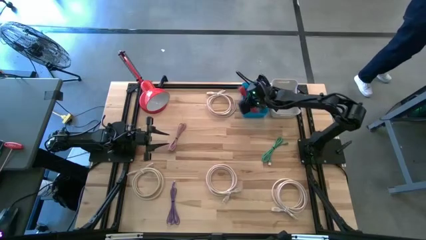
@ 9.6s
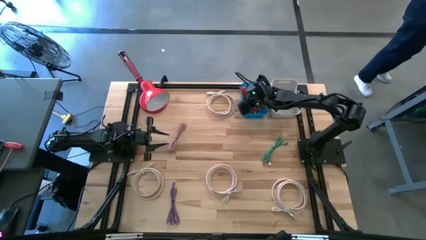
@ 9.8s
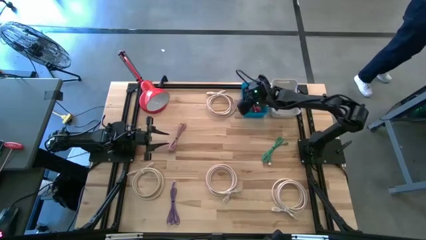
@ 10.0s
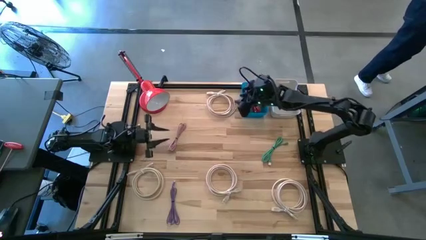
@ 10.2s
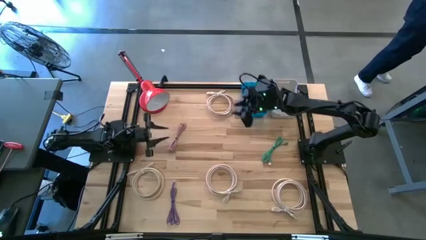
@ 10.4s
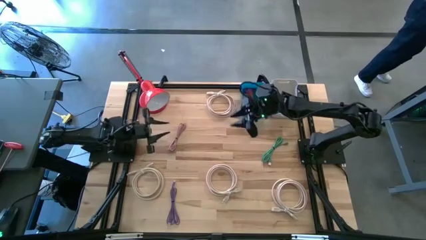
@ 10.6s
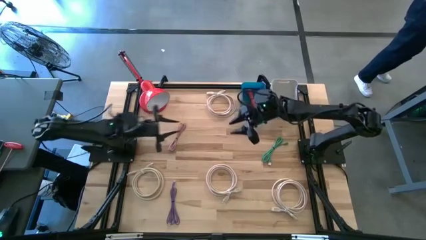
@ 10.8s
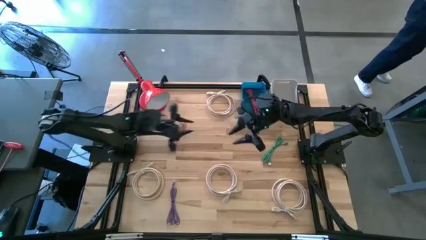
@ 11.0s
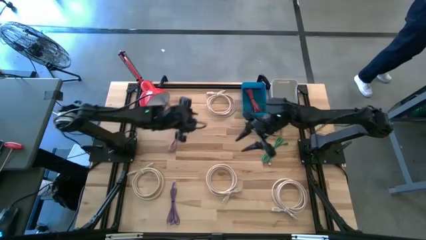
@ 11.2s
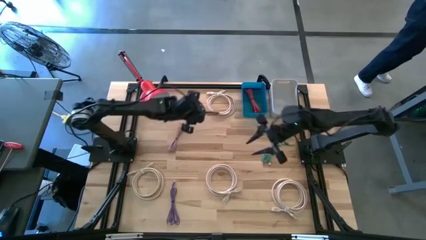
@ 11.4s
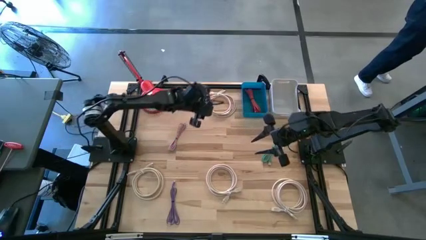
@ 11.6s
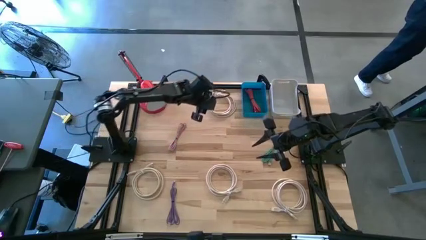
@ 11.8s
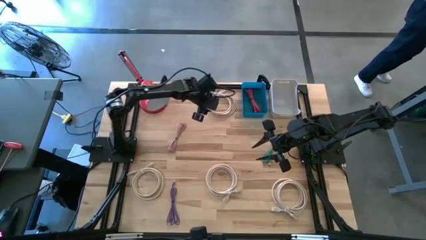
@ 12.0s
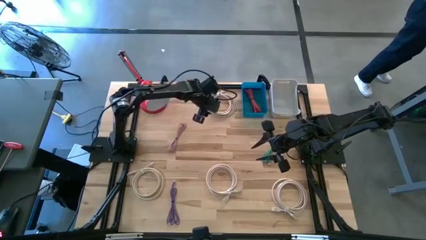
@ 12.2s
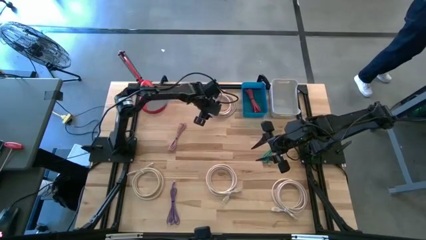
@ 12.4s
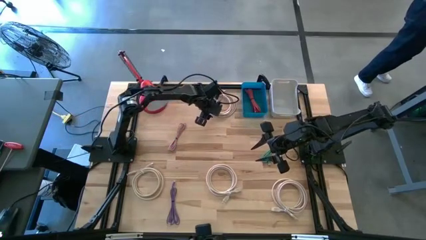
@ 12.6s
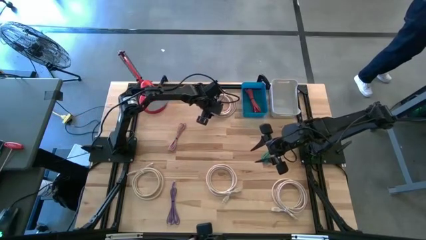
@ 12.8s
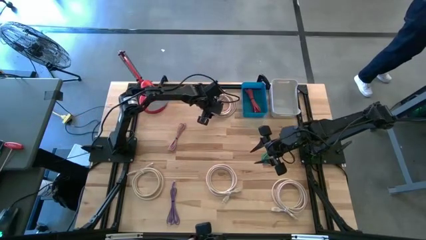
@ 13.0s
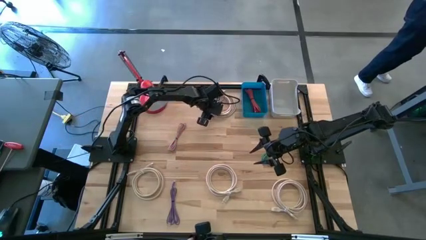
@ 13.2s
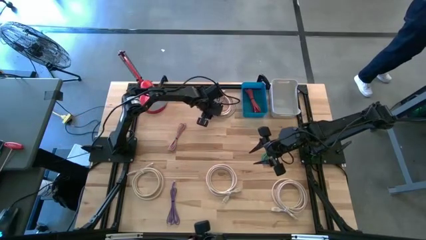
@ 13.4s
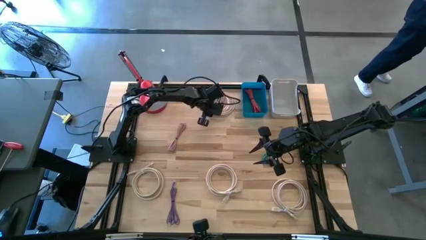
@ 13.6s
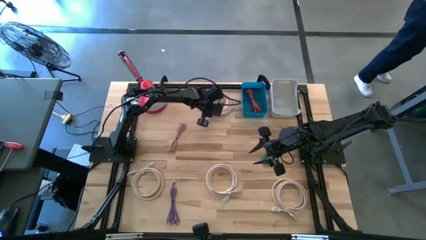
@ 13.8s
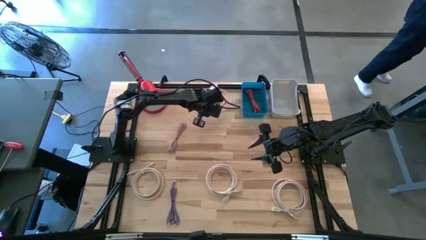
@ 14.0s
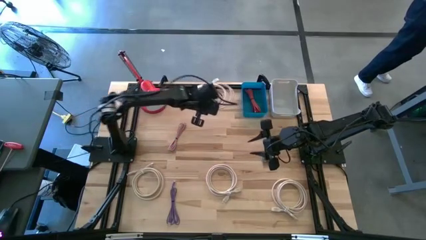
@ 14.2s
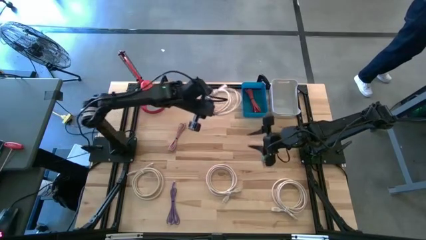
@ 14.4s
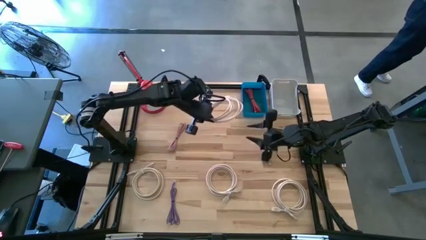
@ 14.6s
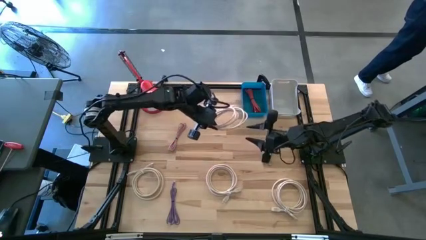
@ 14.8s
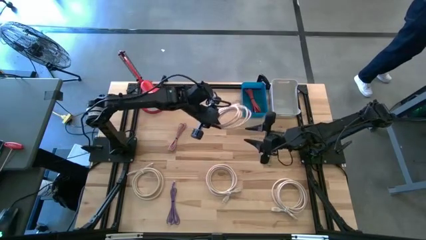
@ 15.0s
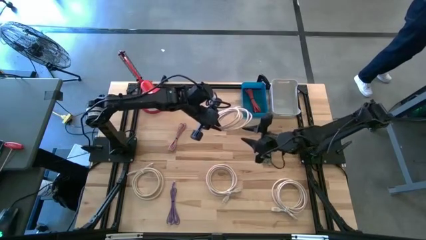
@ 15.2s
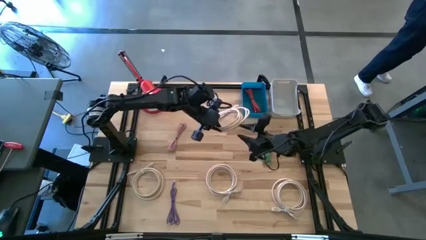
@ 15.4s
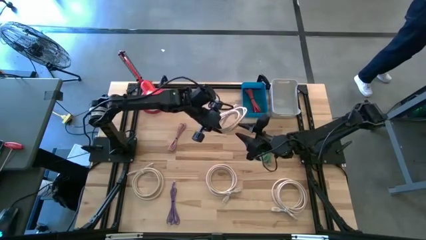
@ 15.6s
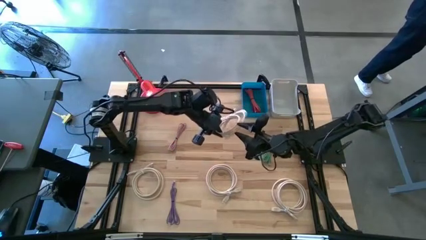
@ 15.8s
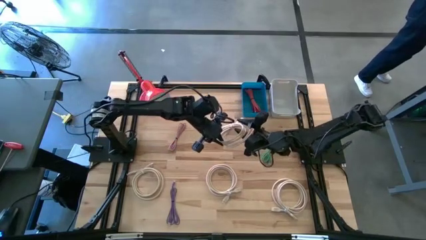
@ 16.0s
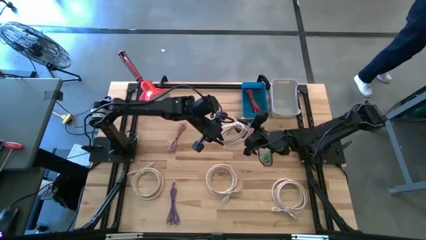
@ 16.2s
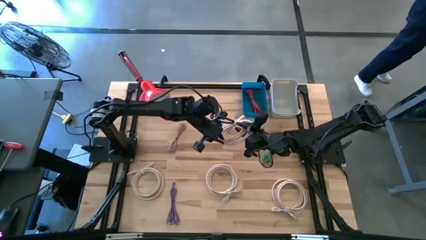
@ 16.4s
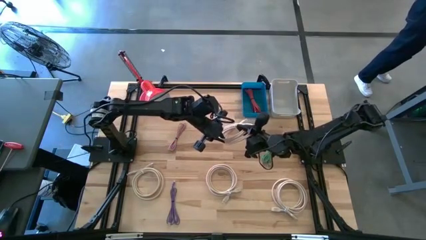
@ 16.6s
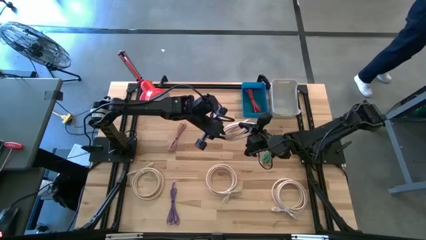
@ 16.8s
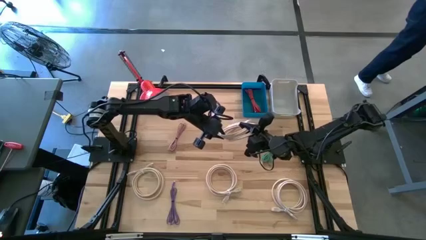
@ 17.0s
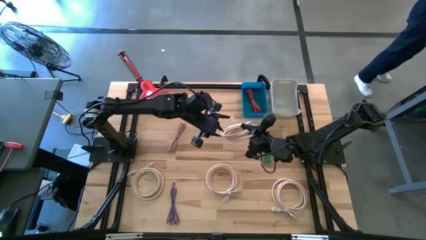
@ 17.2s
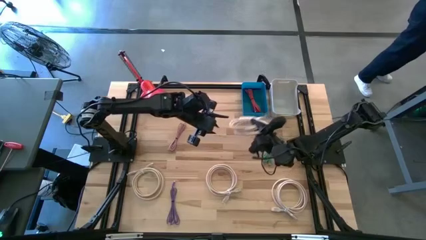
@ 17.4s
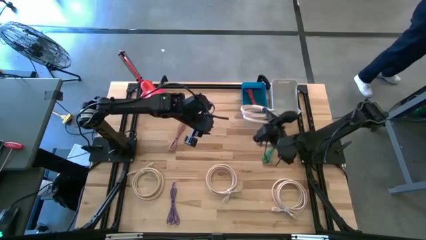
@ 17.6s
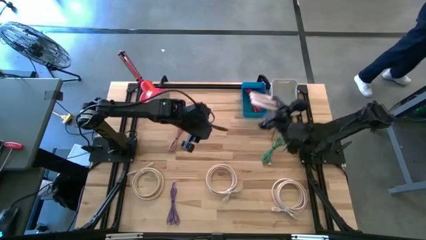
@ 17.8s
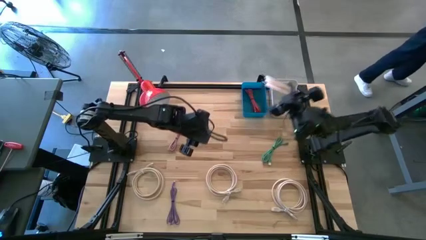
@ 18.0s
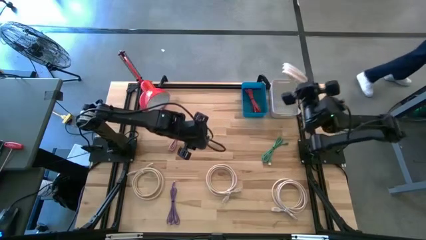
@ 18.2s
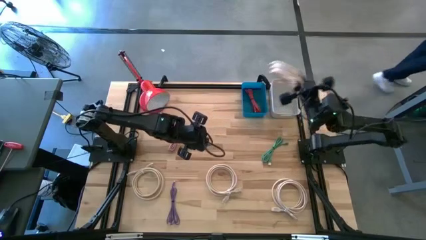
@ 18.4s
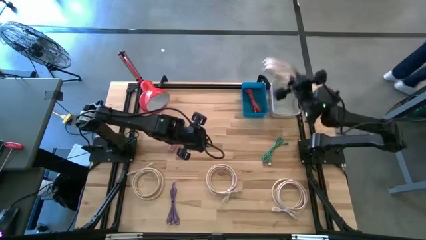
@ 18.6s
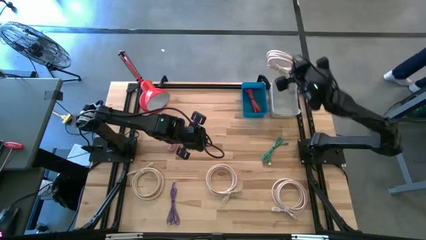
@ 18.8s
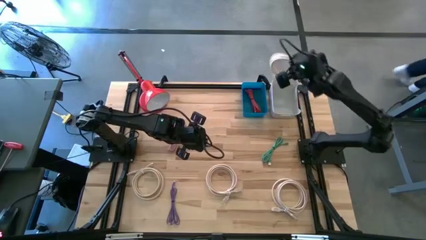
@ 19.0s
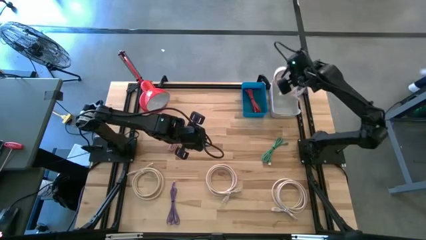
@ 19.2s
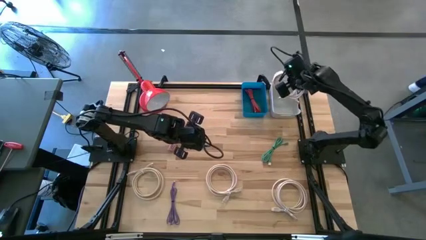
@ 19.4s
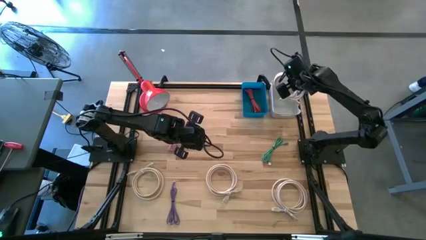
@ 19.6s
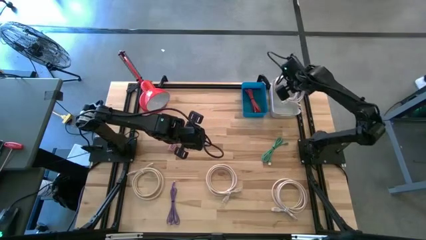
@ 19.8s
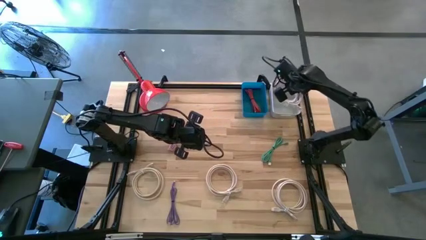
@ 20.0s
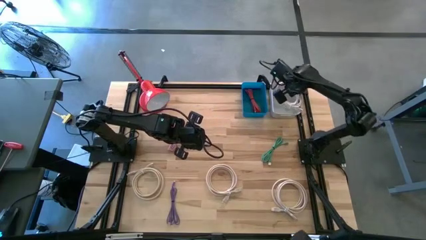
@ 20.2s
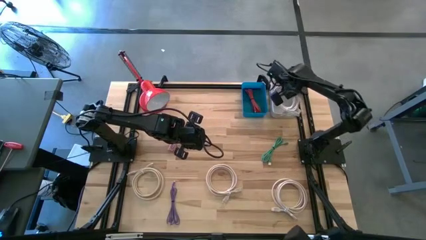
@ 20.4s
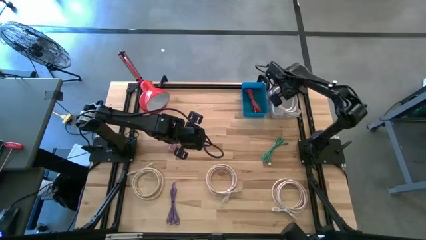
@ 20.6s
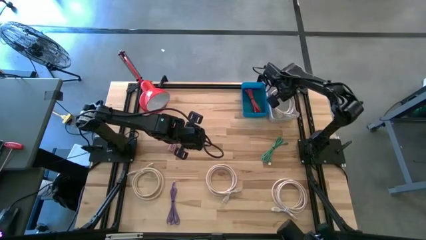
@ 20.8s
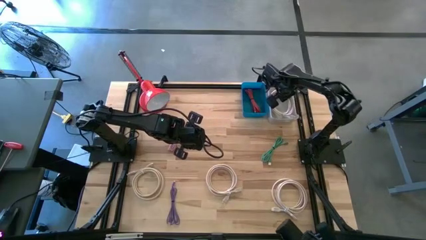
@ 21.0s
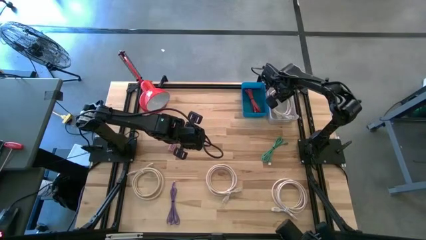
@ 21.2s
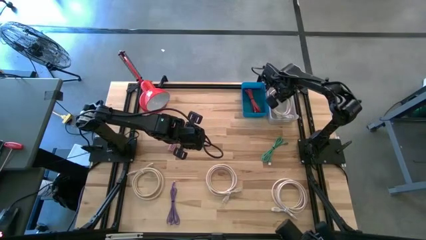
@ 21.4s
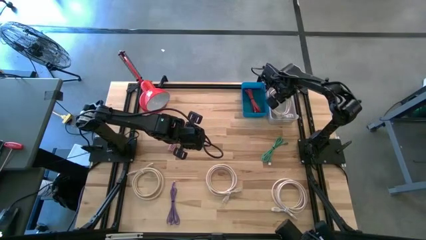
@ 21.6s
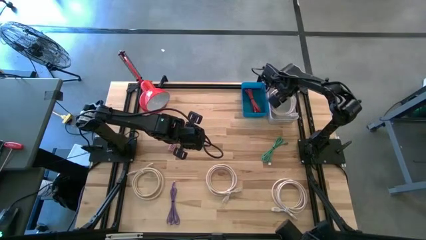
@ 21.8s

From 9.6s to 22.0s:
Task: Pick & Place USB Port
Put the white HDMI cable into the gray bin

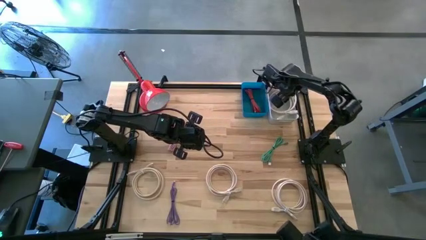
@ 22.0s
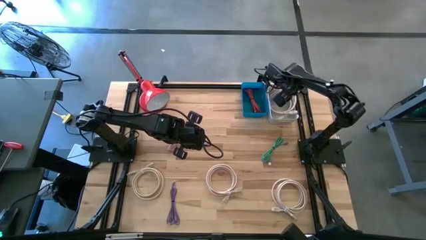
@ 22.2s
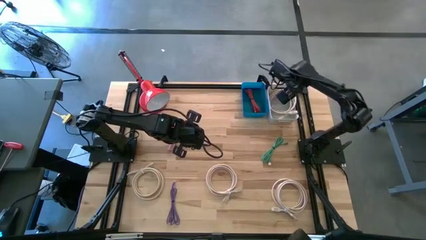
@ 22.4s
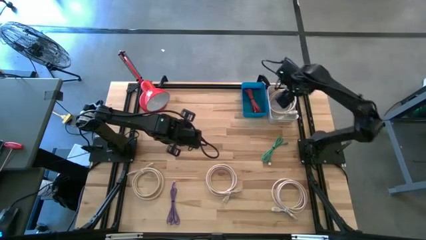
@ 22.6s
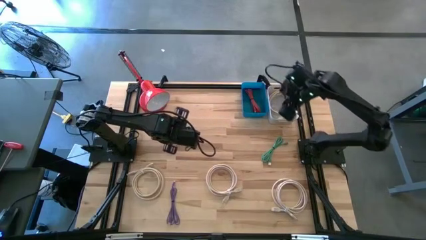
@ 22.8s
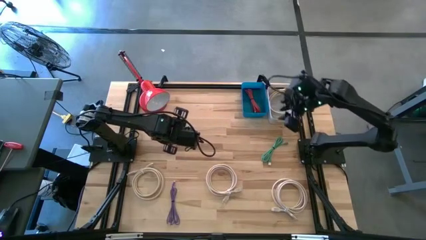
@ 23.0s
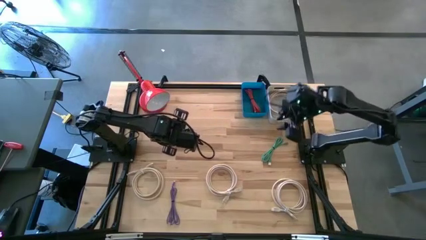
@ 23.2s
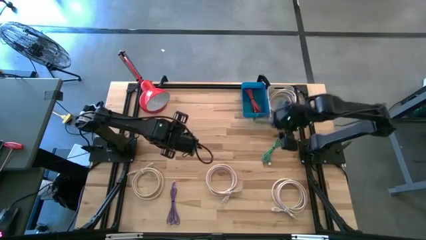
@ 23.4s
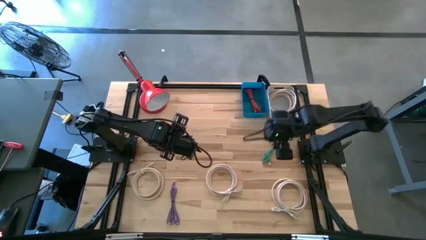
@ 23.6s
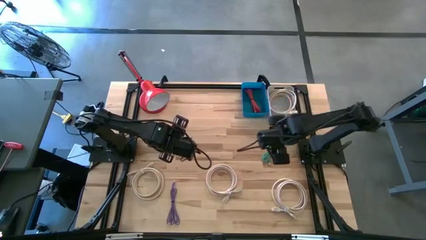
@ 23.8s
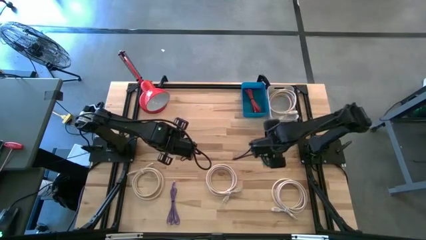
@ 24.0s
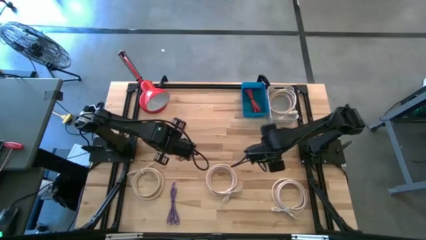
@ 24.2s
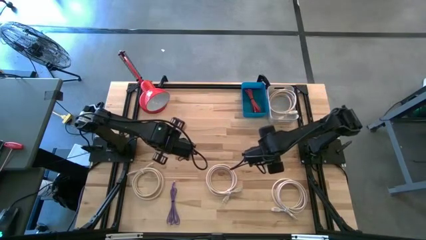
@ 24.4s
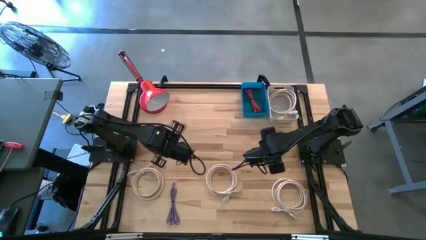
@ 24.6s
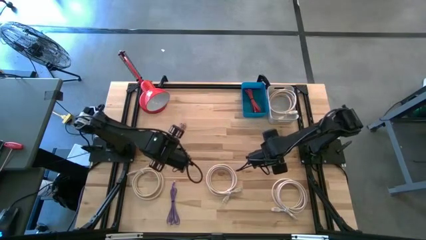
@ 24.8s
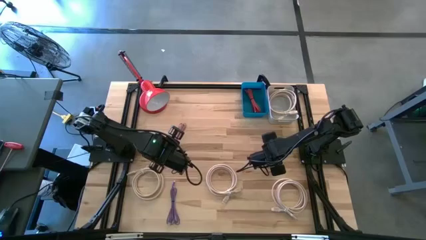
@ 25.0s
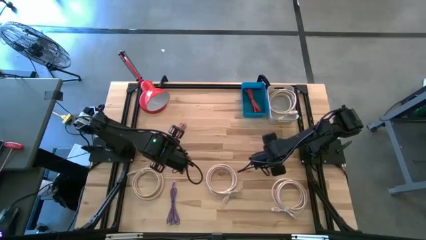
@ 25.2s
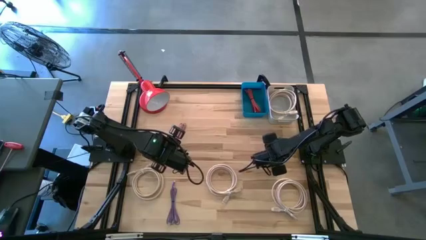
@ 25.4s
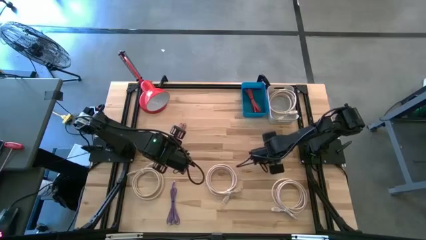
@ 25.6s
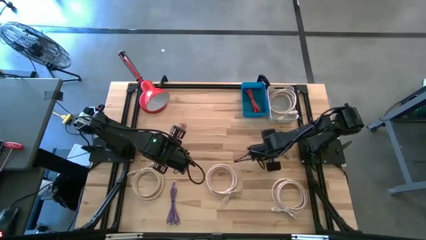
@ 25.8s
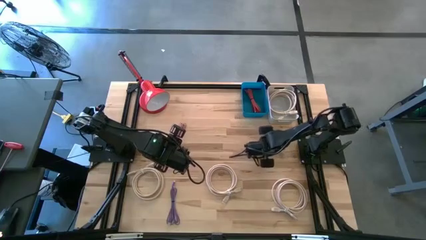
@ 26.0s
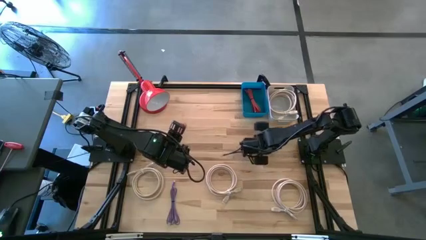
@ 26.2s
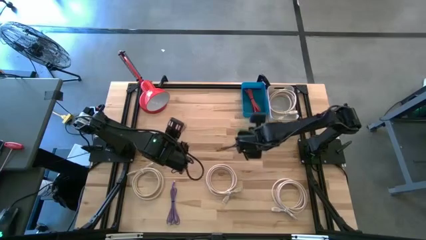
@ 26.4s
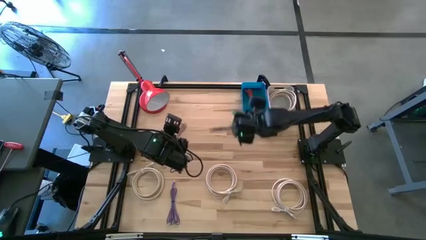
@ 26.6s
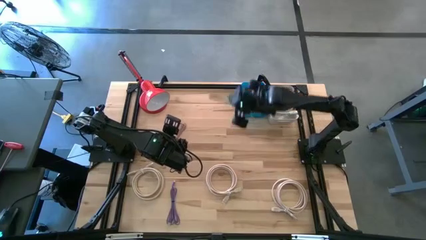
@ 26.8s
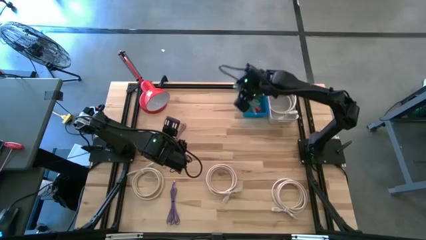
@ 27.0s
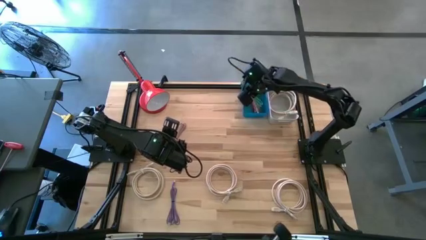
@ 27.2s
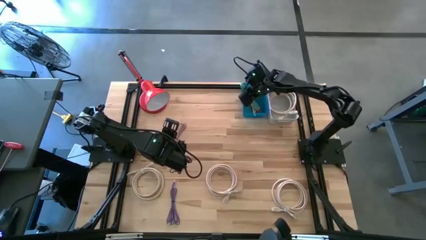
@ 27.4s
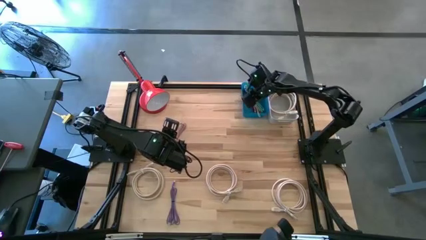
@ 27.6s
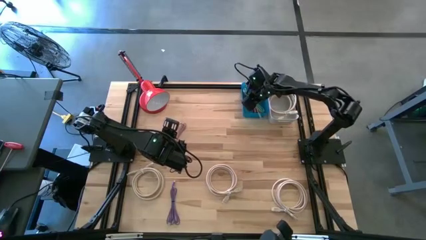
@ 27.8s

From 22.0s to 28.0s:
Put the green charger cable into the blue bin
